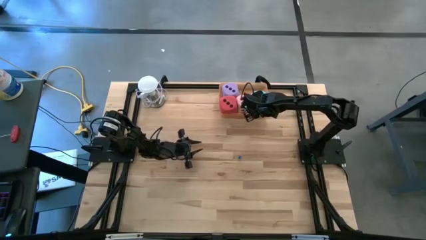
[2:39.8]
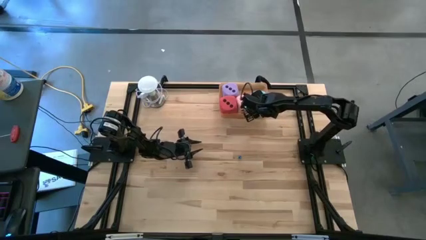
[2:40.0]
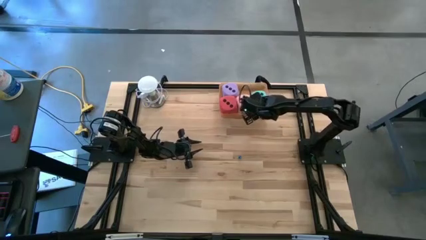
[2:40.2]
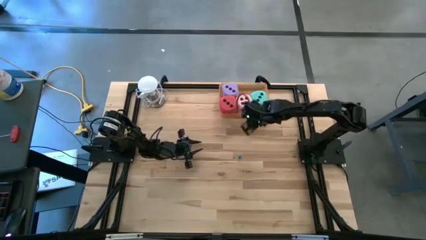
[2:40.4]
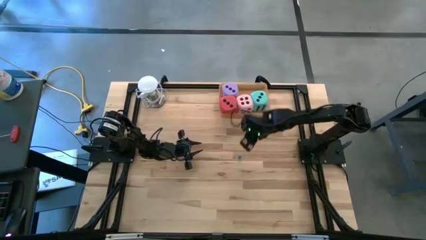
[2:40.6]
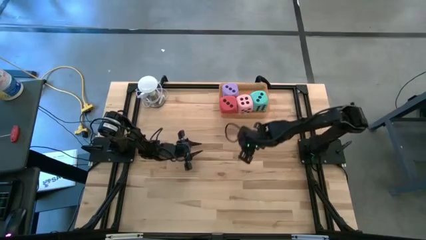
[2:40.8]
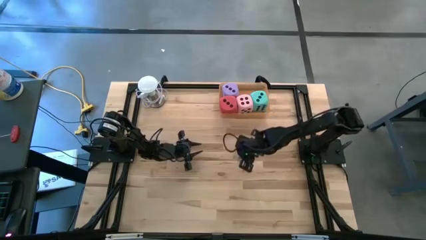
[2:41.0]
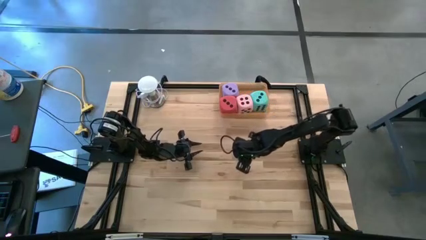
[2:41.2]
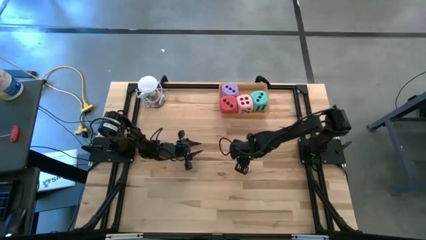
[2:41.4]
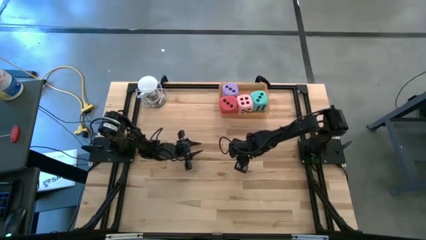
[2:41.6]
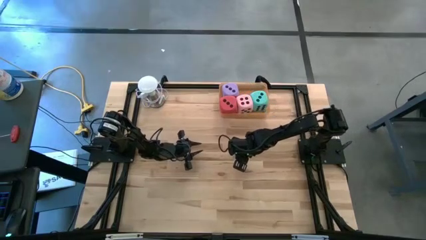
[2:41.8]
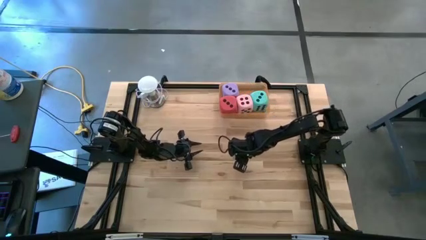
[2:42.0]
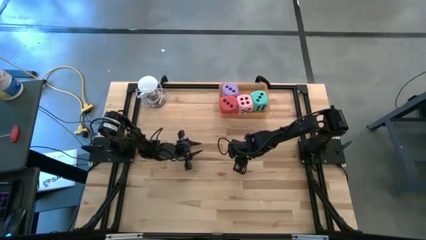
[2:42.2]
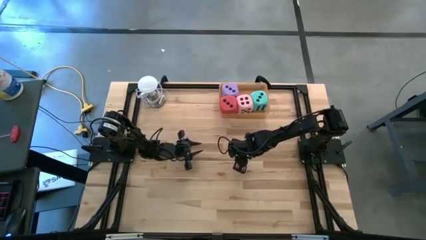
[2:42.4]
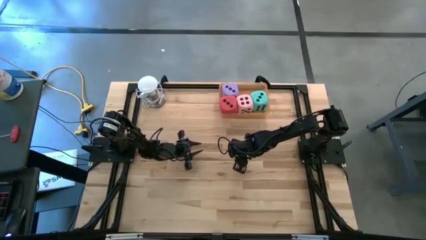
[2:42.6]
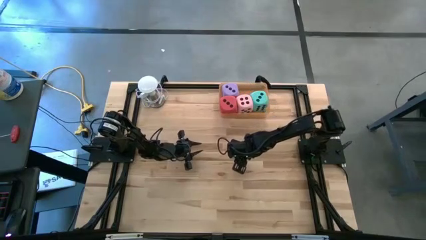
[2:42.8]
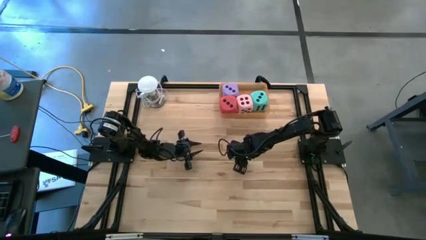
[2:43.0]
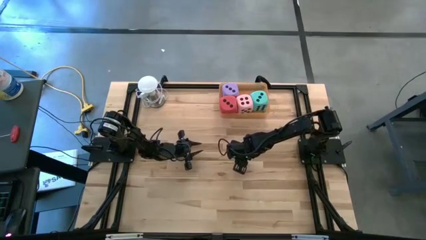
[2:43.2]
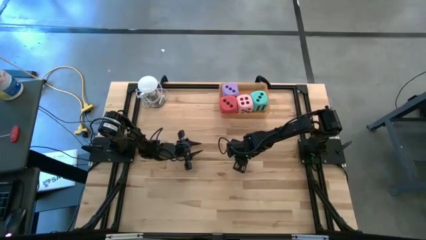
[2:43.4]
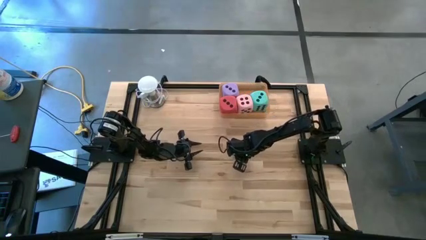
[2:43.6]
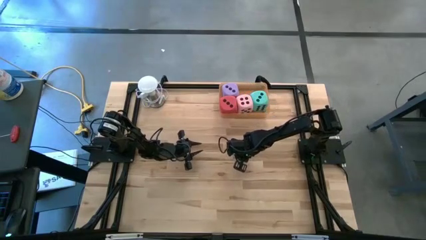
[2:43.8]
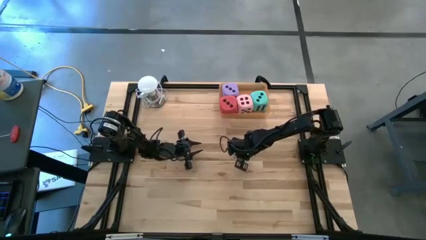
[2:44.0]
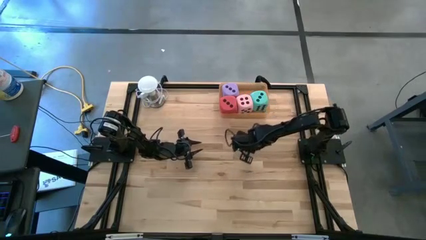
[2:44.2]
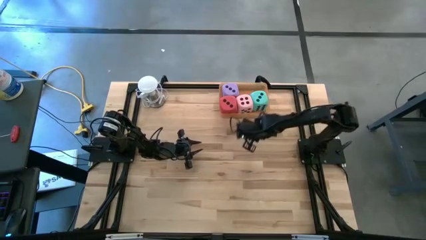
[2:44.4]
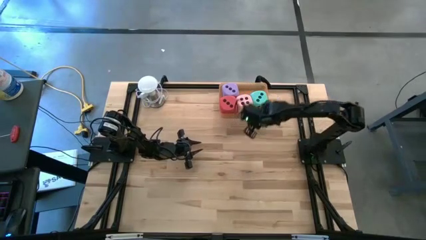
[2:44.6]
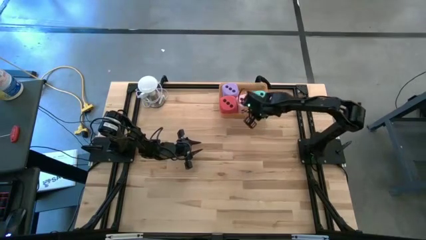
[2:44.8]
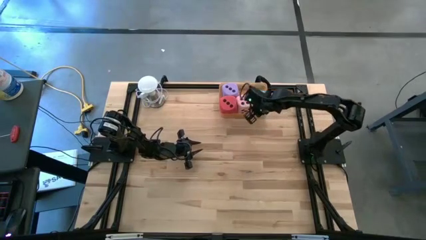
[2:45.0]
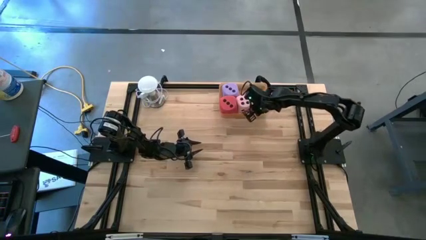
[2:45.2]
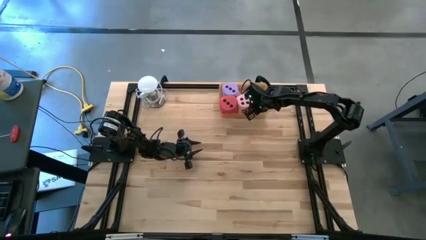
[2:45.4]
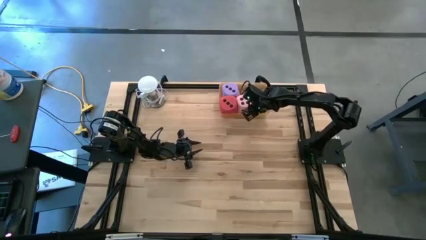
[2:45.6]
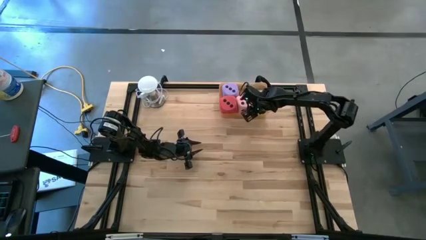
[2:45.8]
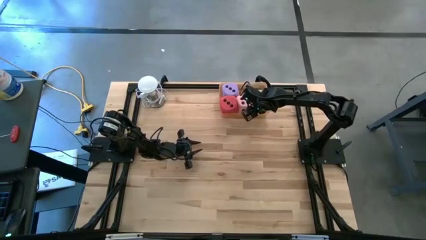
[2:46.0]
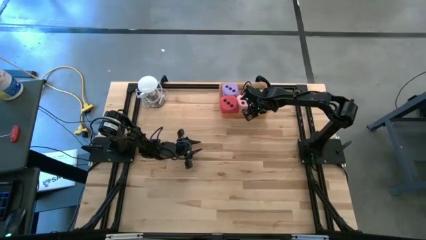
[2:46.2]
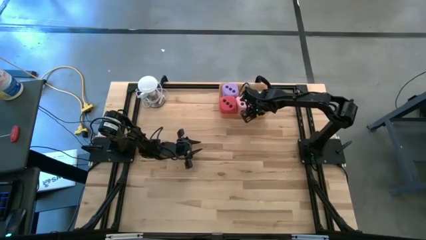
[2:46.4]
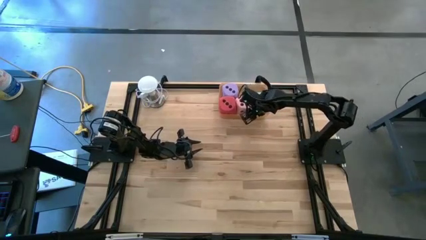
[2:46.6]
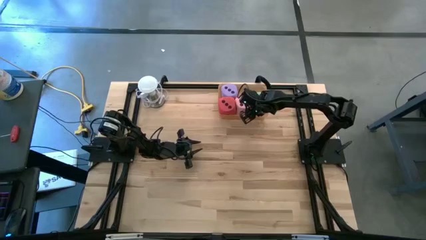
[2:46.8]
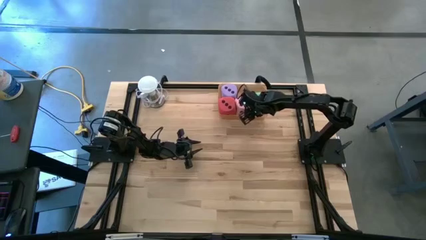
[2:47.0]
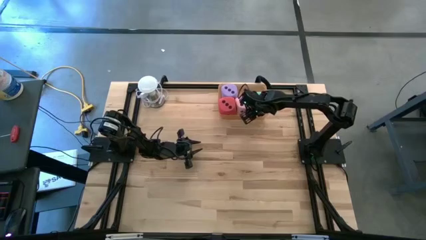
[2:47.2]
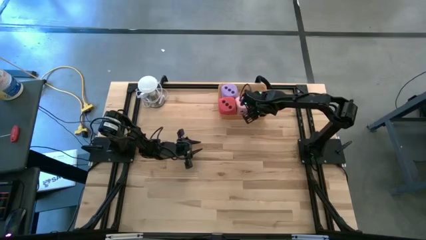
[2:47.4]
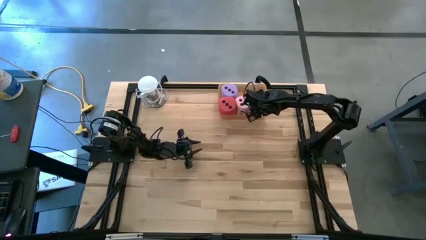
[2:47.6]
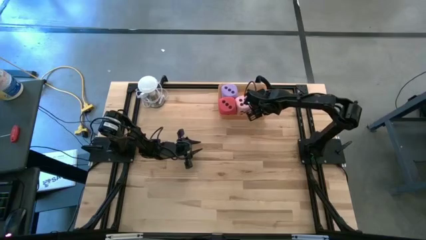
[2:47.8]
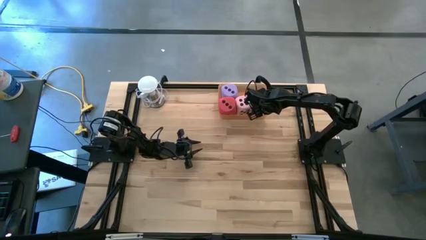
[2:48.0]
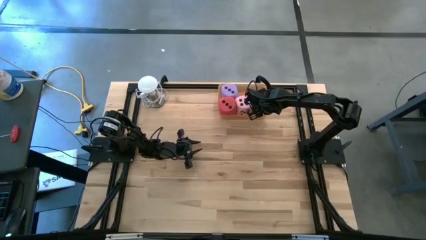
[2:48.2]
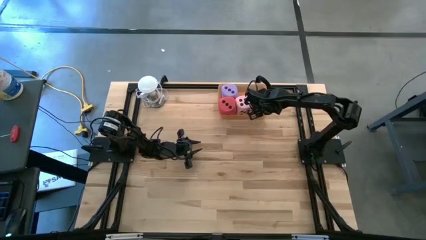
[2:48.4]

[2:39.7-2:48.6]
Task: Pick & Place Dice
Put the small light blue die into the orange bin

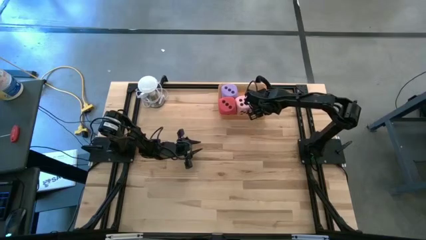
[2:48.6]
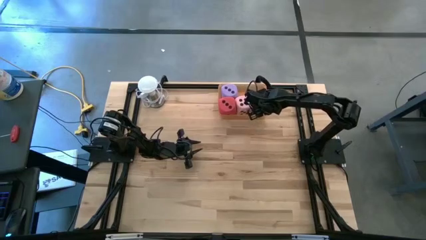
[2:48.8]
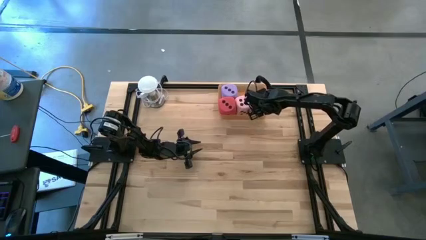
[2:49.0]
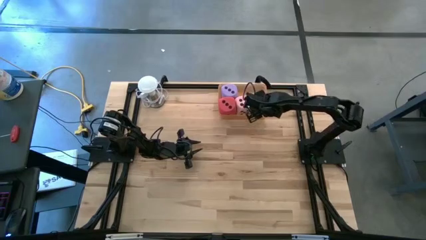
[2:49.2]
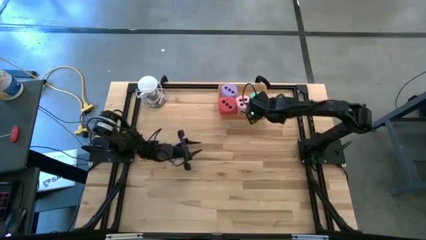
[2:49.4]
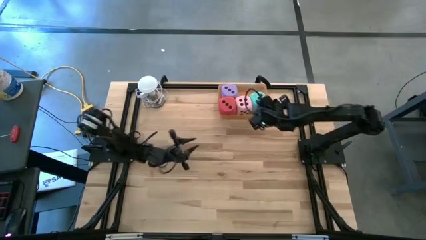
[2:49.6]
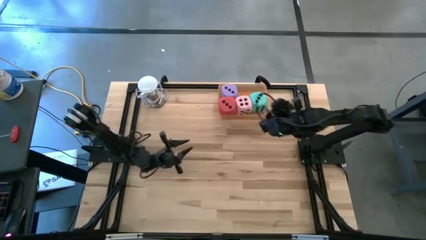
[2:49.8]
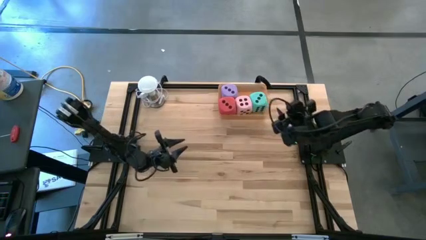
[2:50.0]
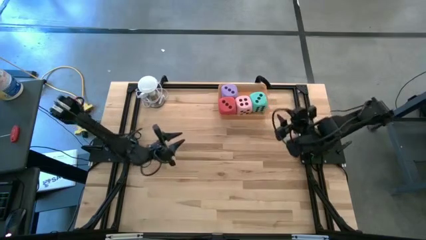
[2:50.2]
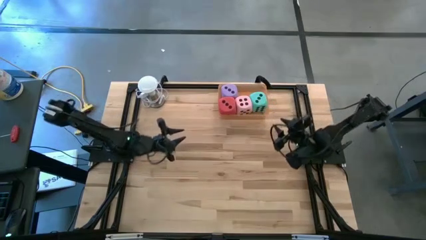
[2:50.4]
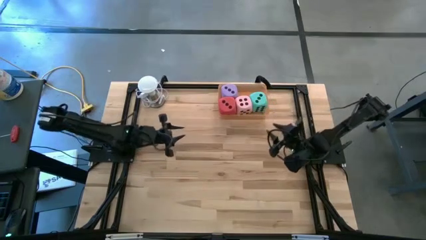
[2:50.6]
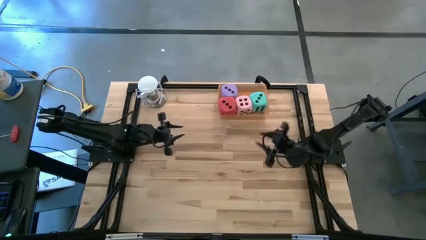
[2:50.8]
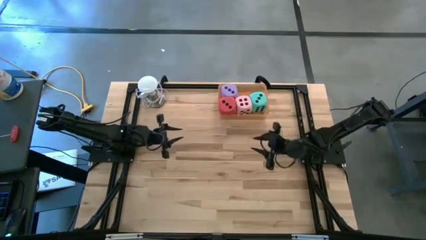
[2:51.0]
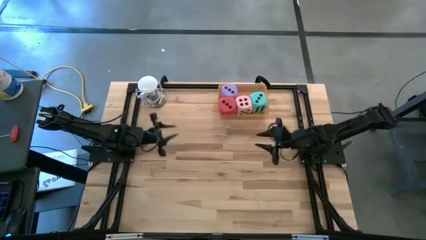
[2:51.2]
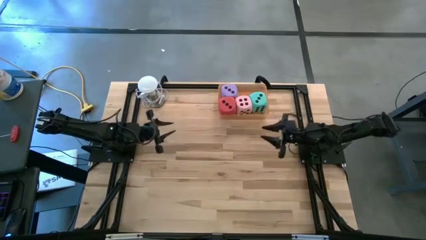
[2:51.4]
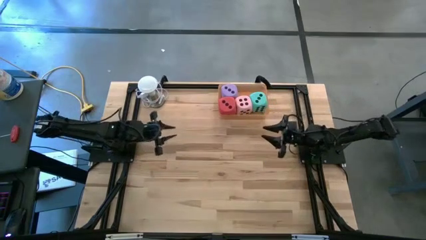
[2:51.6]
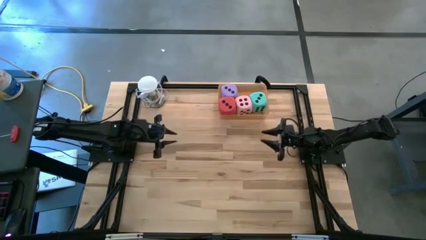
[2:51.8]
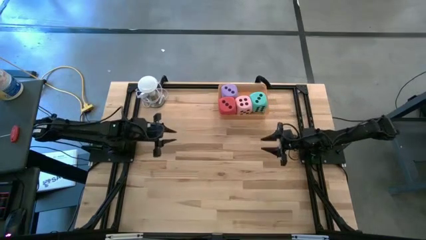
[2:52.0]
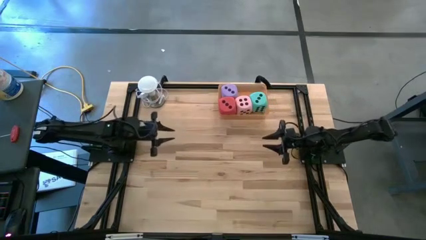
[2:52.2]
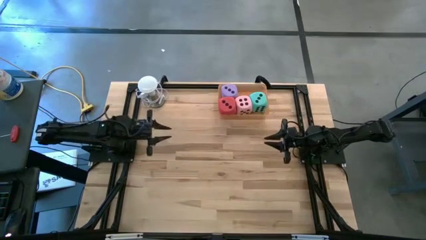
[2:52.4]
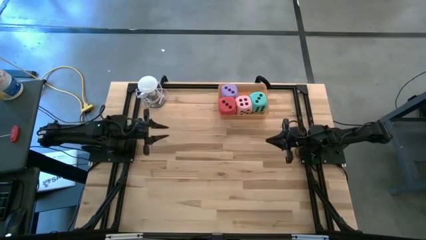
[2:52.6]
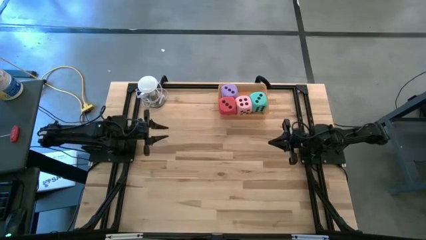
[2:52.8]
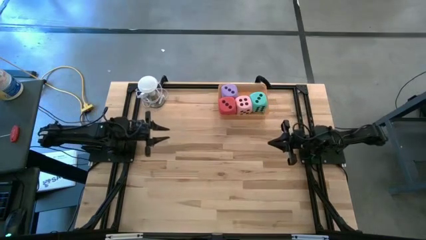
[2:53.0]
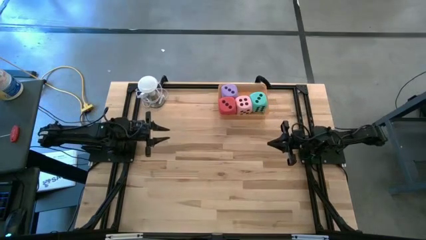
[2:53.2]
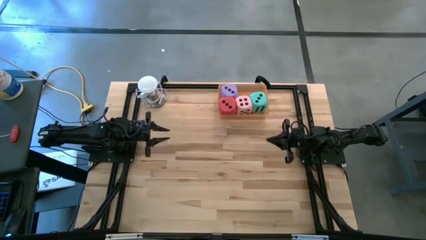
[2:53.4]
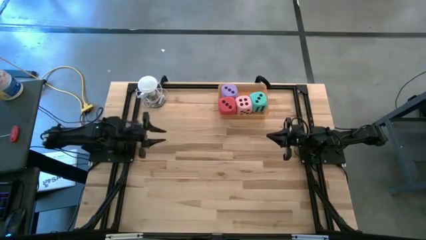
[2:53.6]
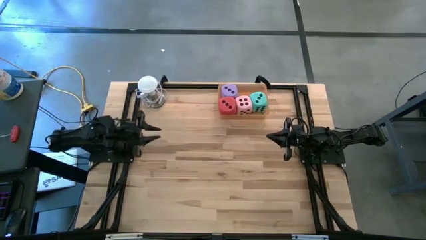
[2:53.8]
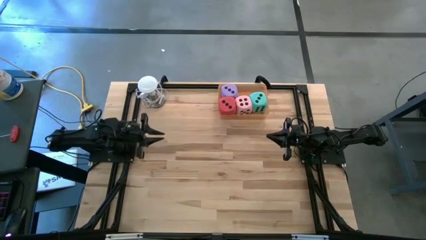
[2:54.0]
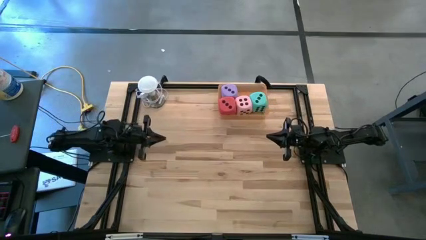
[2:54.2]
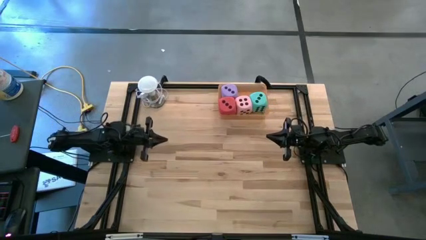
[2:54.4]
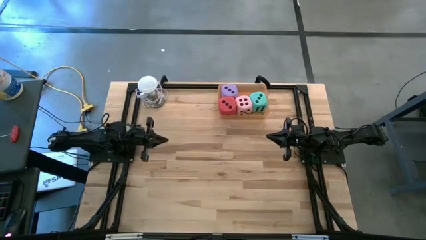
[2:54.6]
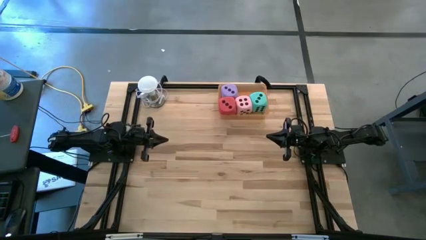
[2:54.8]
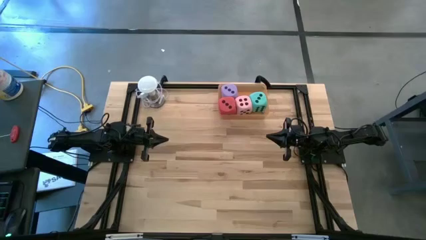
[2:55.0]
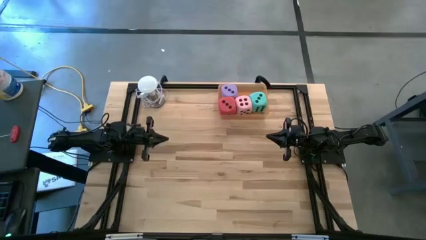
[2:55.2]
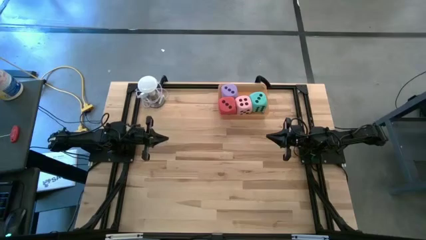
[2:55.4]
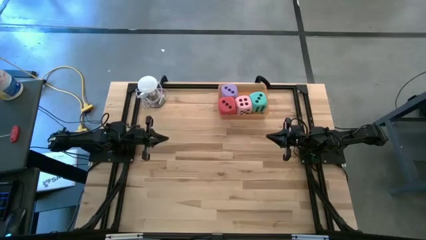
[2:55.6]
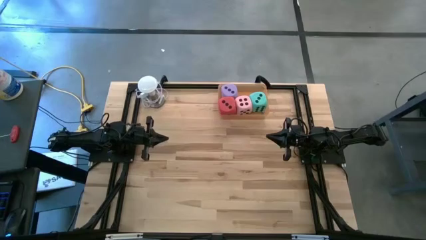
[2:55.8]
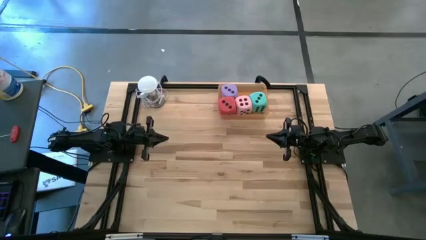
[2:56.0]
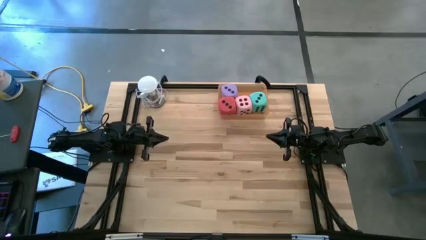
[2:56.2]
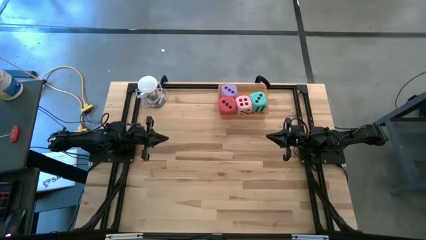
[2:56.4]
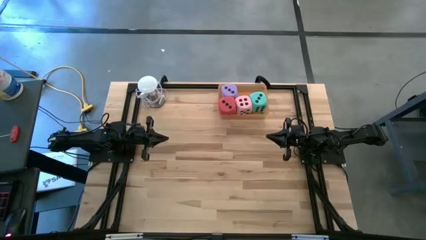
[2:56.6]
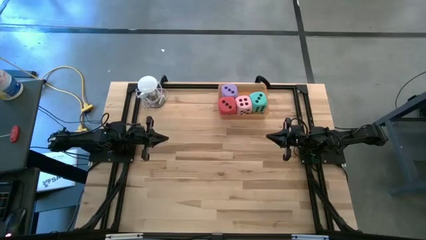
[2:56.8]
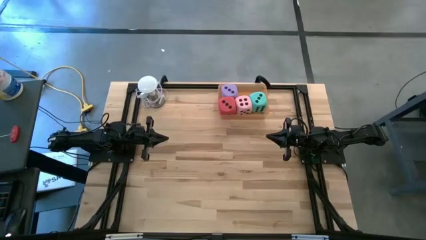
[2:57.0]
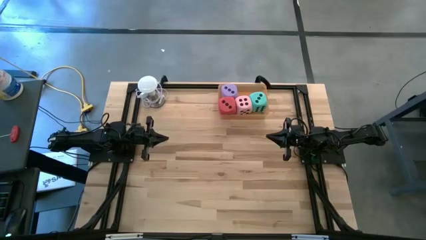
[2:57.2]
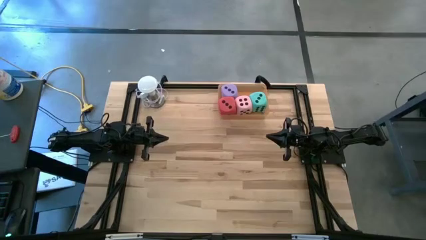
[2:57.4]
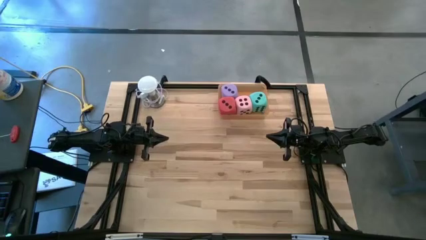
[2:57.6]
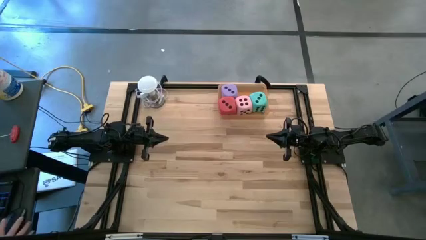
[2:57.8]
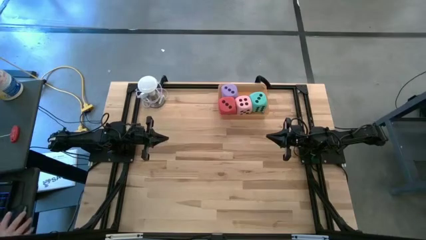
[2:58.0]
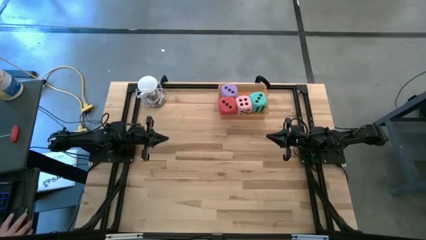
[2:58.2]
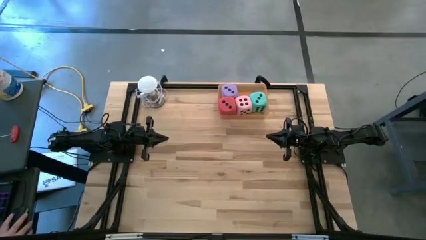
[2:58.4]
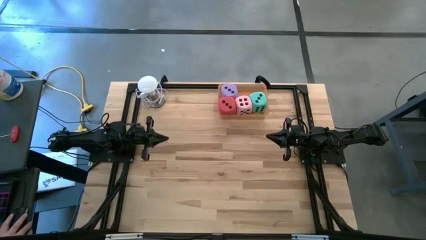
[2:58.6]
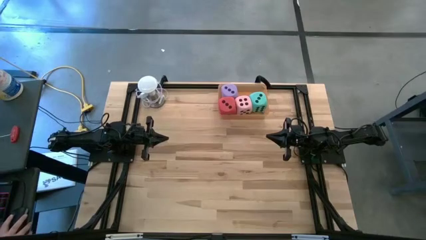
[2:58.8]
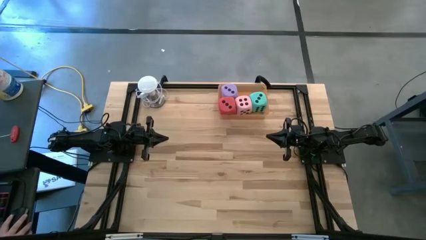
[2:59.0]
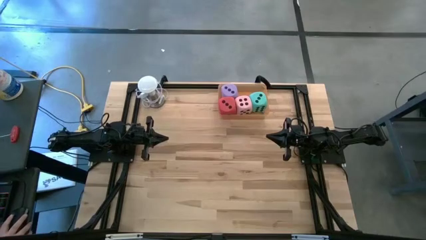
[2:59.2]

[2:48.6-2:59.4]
Return to Home Position
